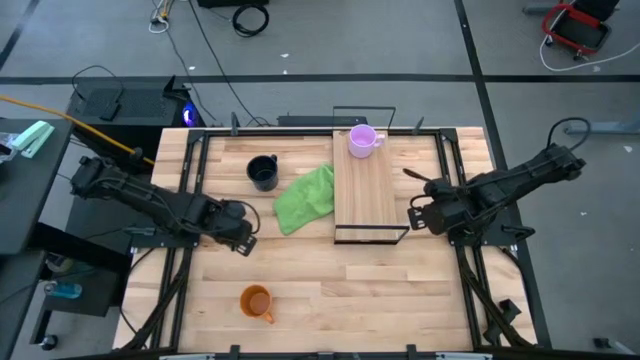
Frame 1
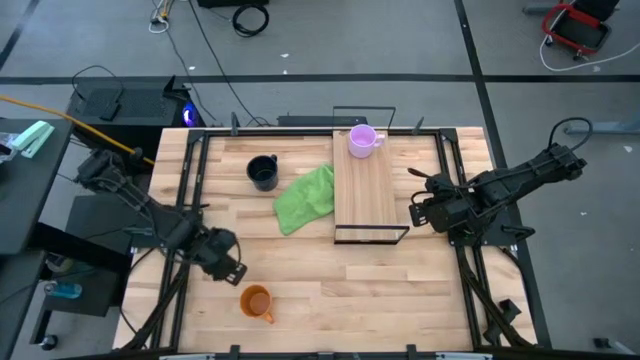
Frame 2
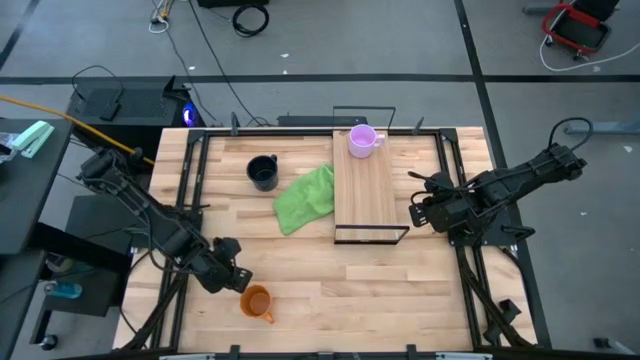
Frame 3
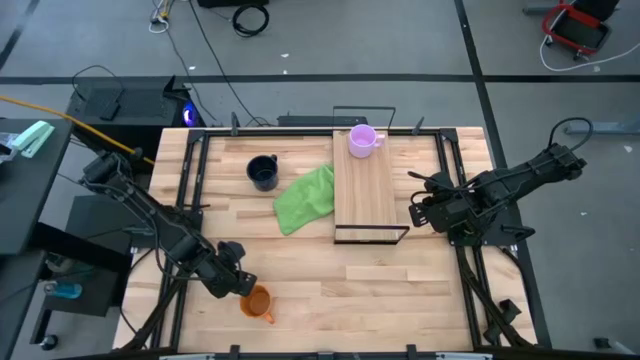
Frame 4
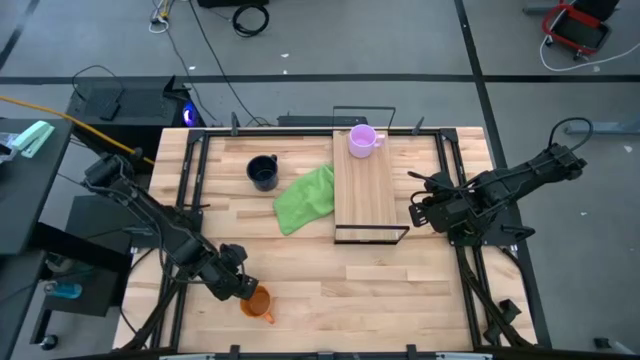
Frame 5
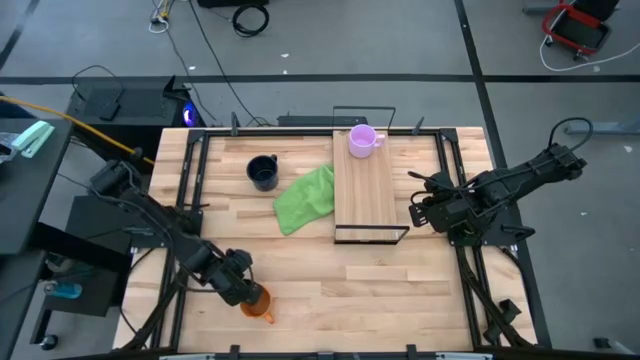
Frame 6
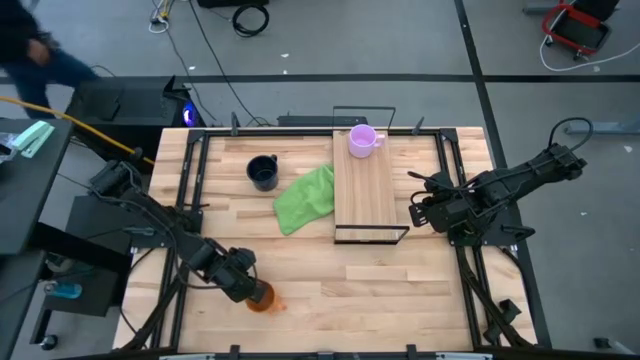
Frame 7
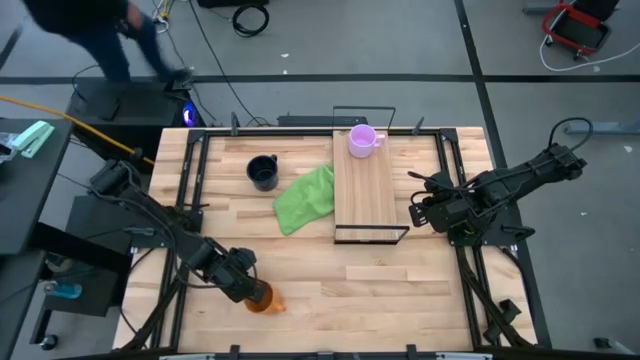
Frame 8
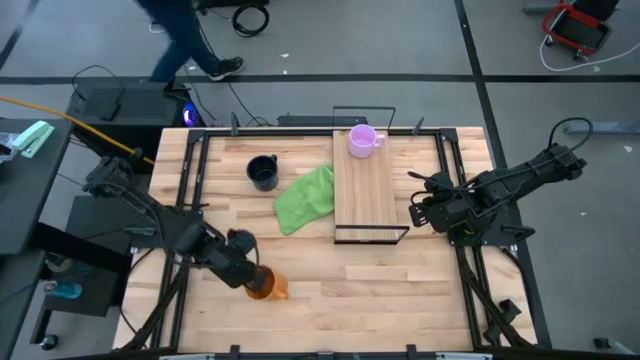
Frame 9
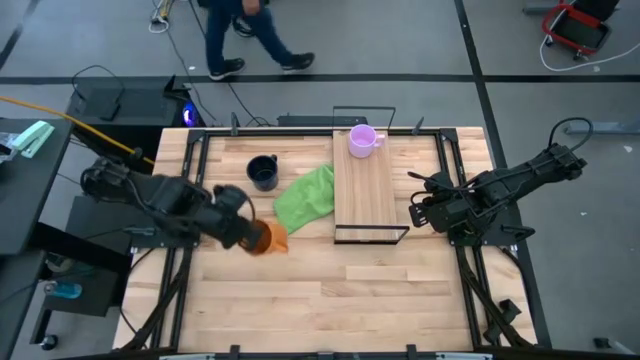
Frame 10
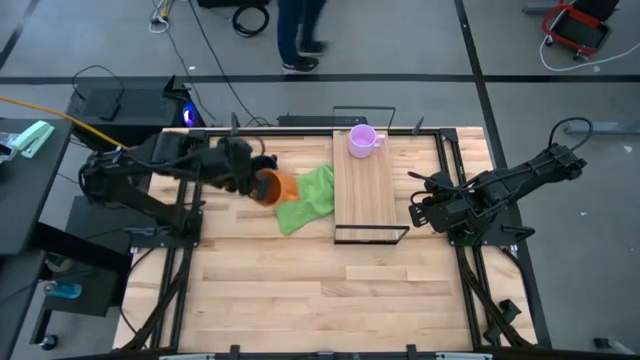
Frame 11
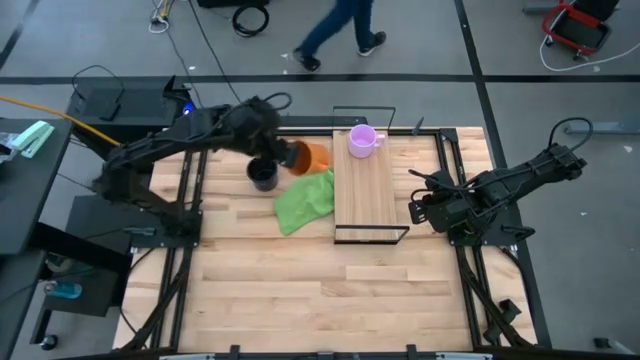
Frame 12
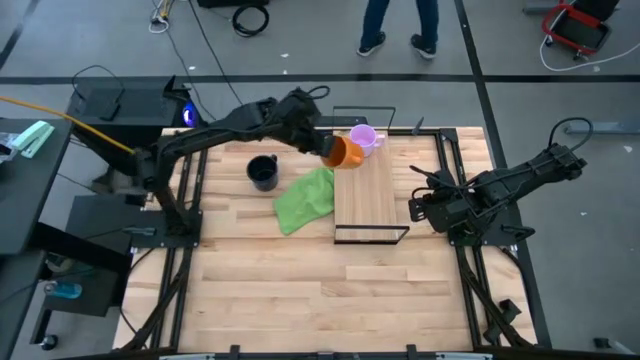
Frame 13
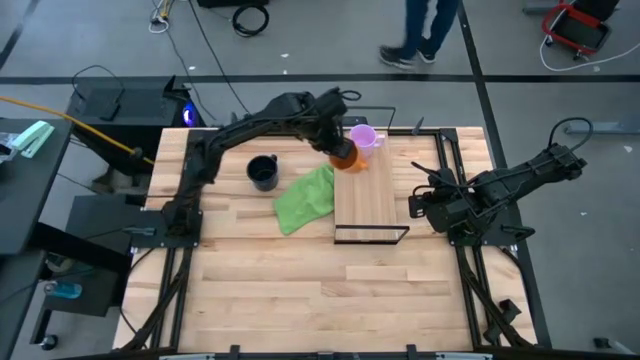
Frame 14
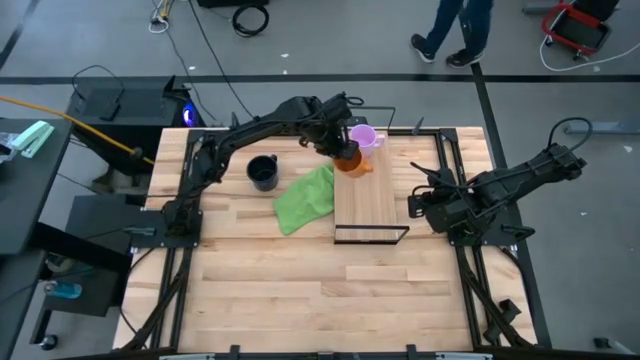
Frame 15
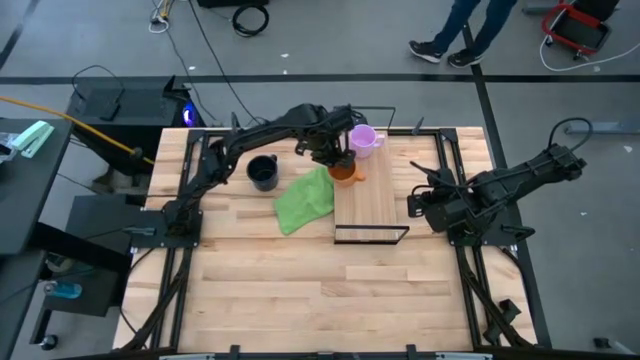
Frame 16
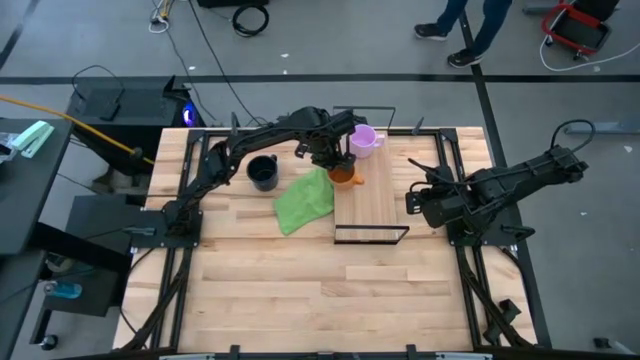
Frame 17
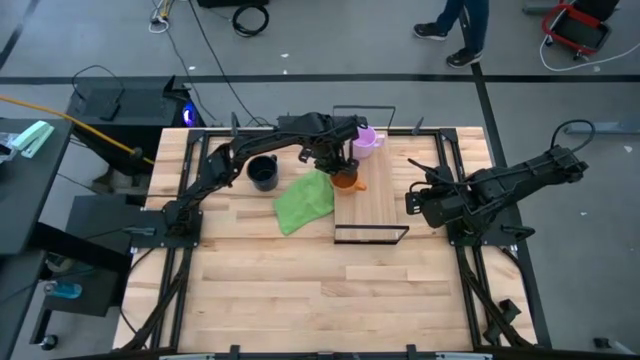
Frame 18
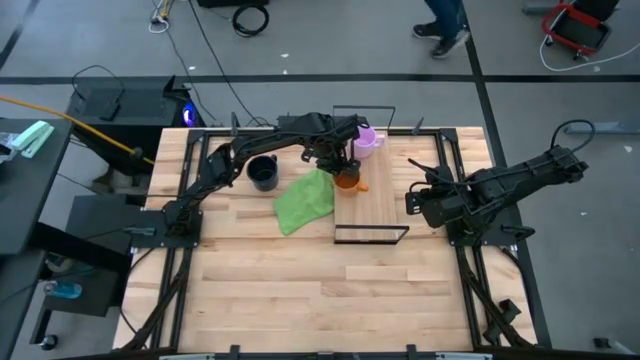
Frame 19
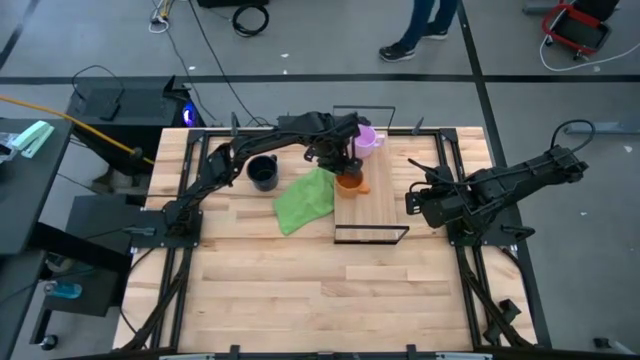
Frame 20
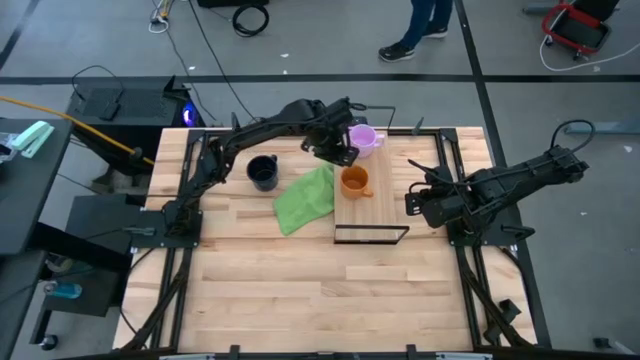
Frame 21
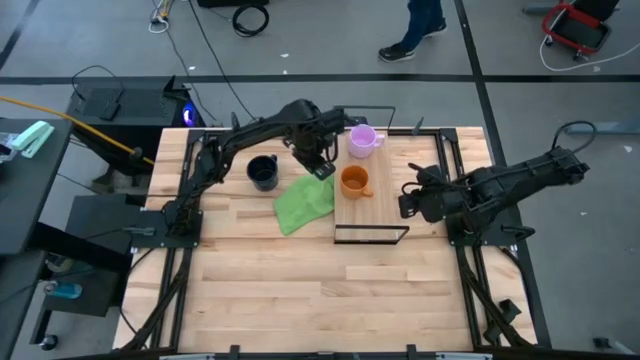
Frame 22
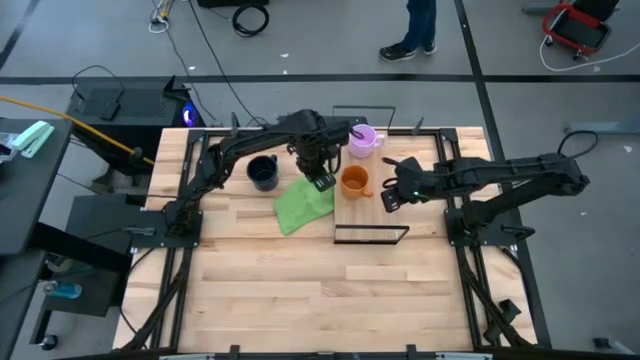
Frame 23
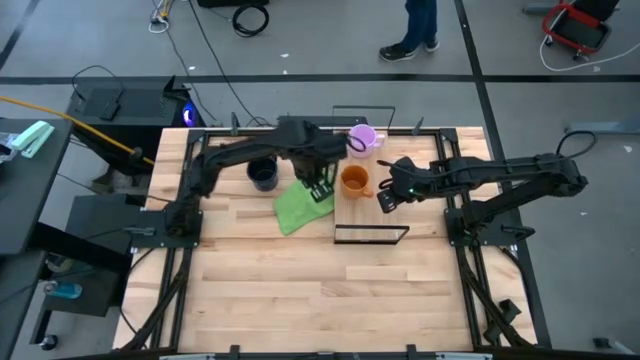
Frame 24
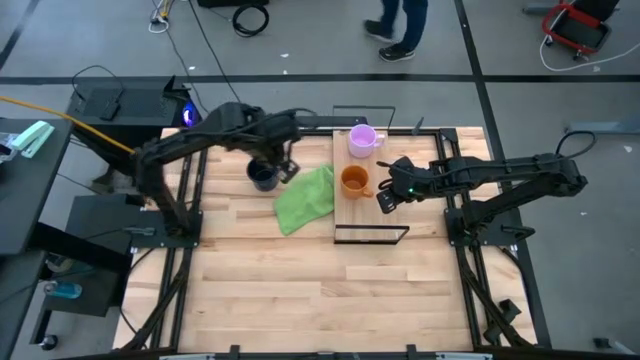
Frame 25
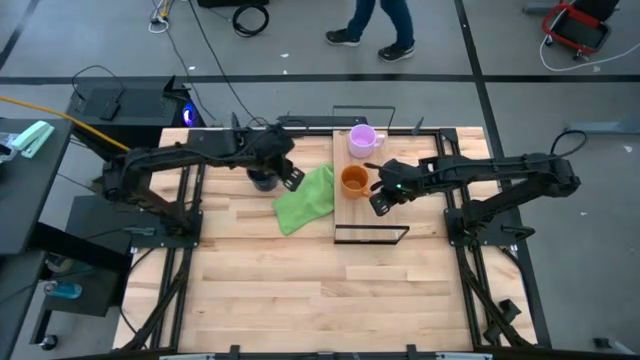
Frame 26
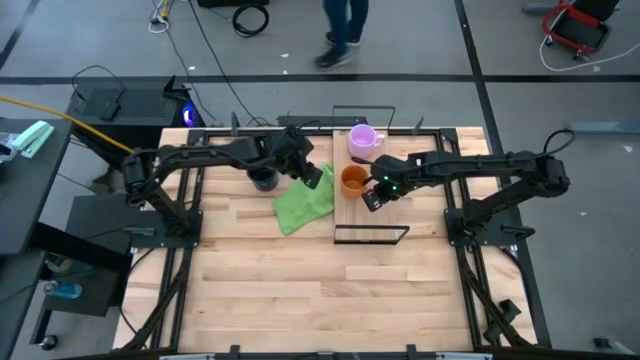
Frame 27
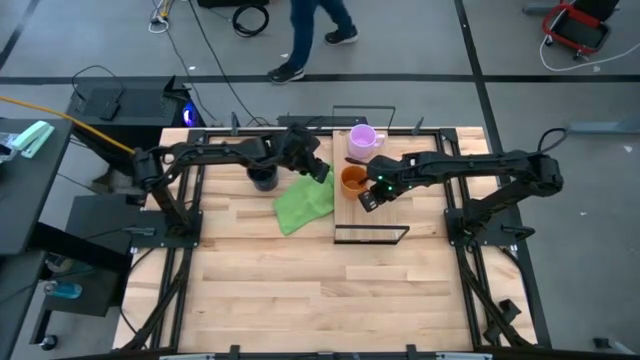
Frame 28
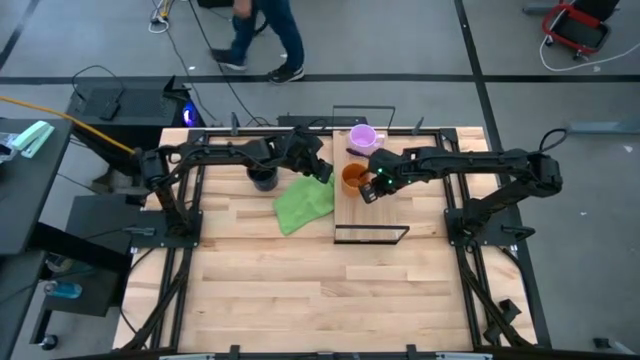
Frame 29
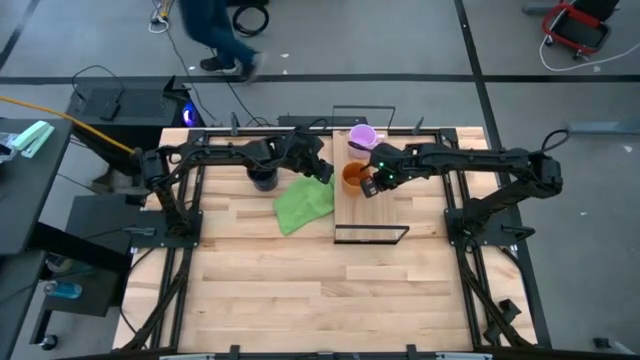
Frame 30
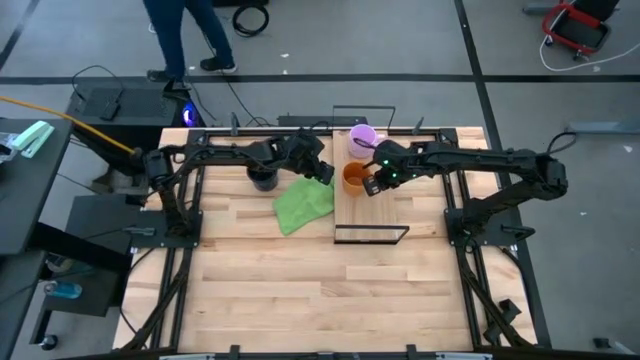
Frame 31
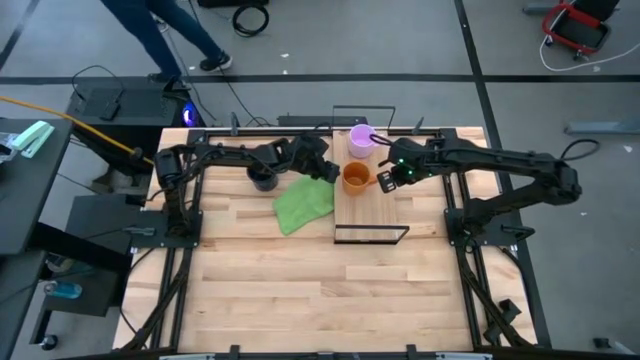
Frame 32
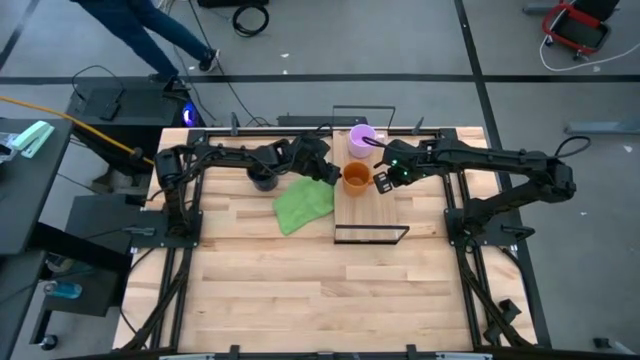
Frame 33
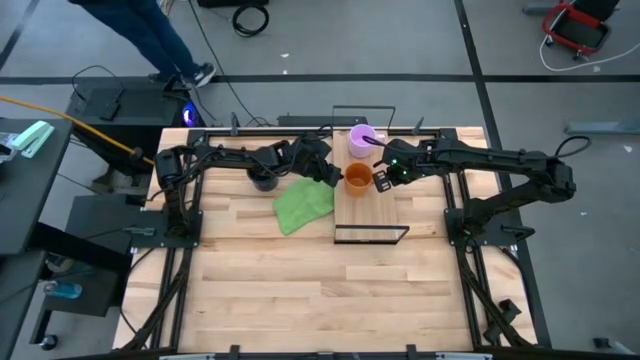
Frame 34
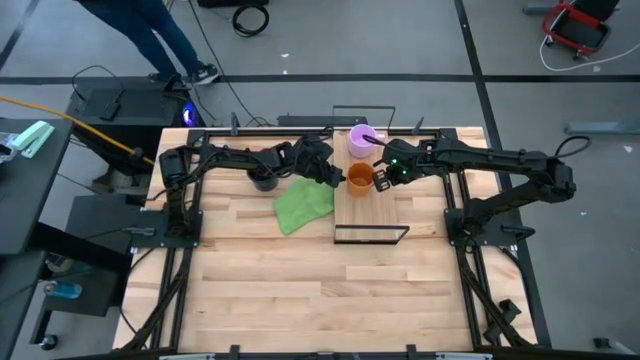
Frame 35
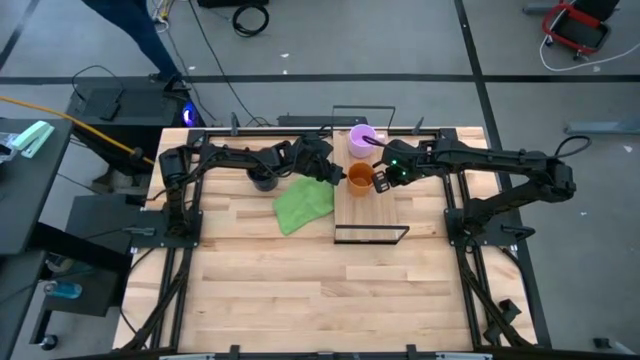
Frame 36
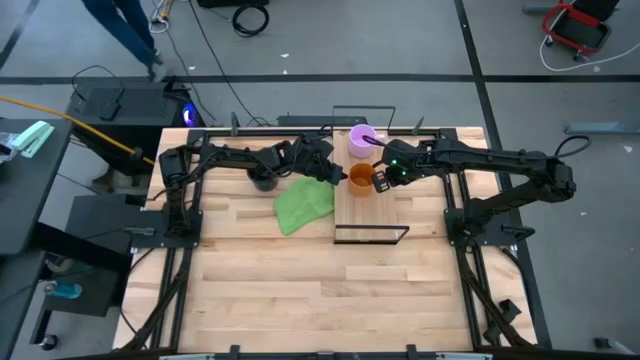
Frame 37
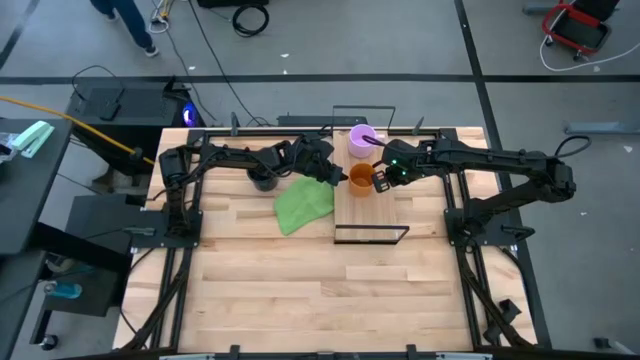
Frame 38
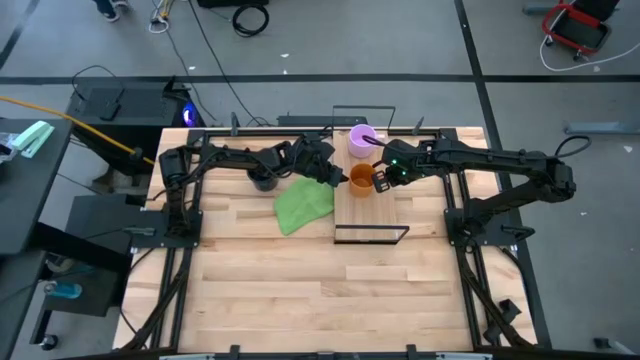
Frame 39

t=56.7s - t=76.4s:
Task: Stack small to large cups/mugs on shelf
Put the orange mug on the shelf

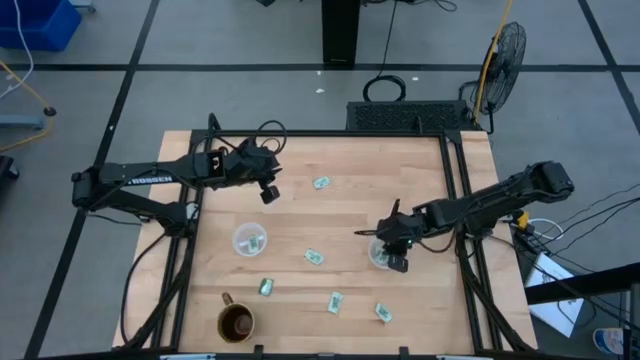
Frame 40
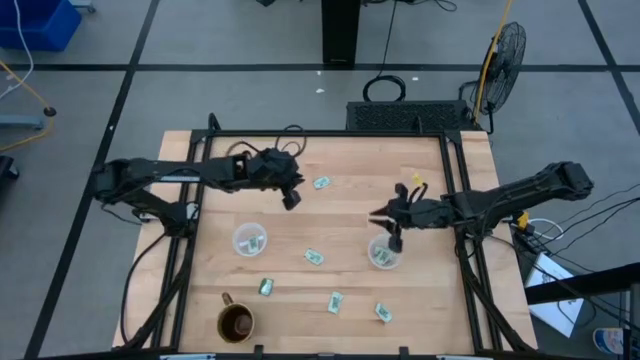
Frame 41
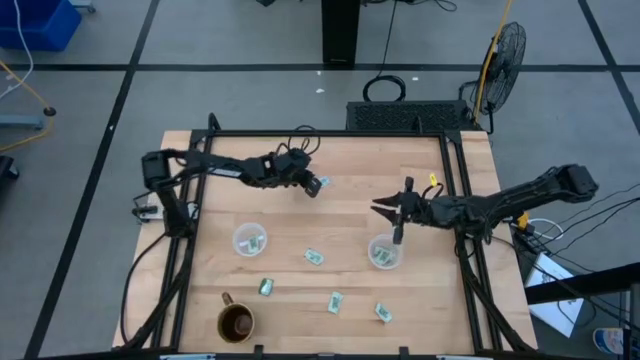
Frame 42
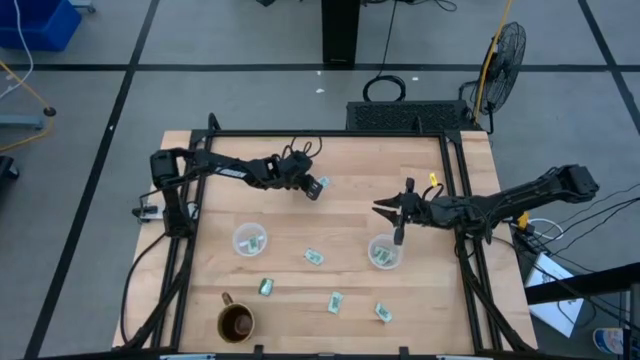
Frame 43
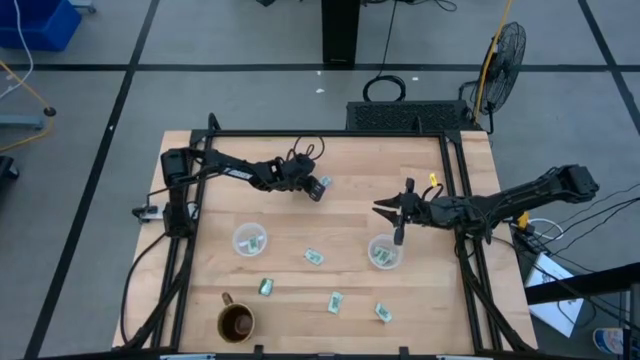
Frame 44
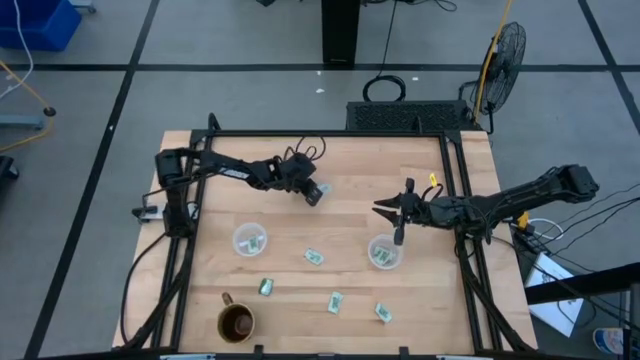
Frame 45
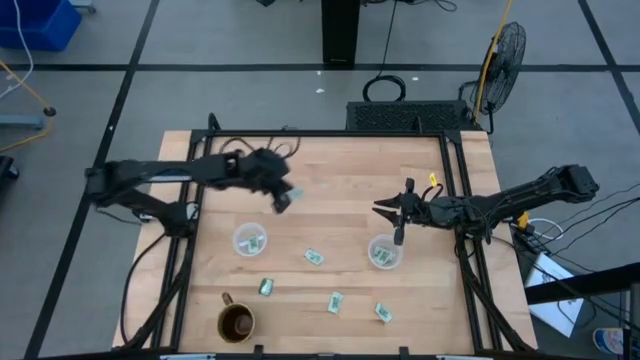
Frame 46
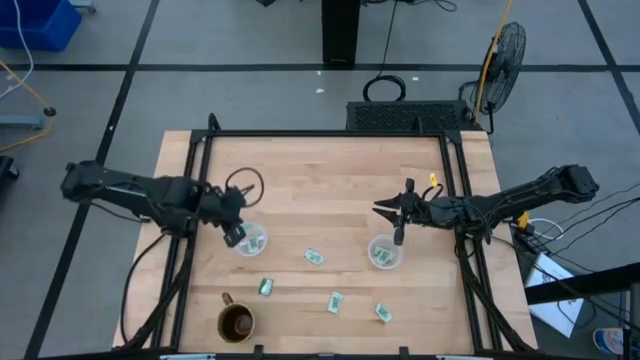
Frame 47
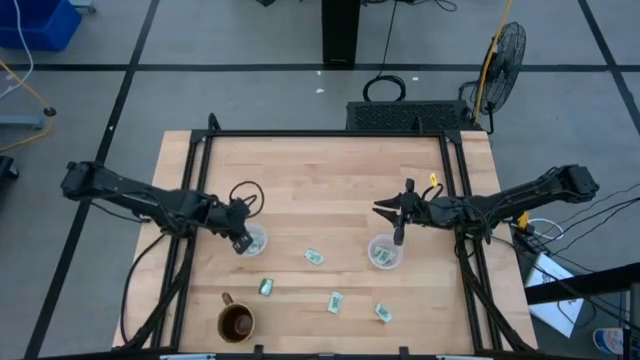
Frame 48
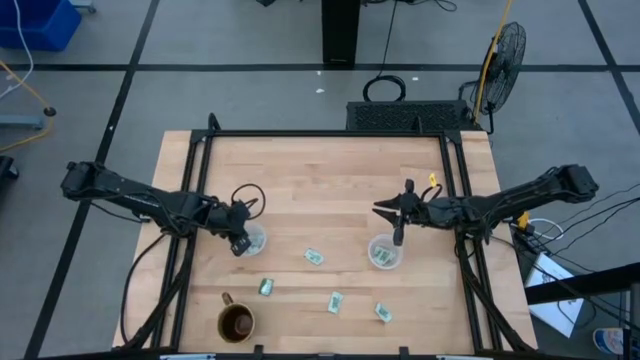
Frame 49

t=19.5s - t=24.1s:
Task: Pick and place Stevia / Truvia into bins
Put the light green stevia packet into the left transparent container
